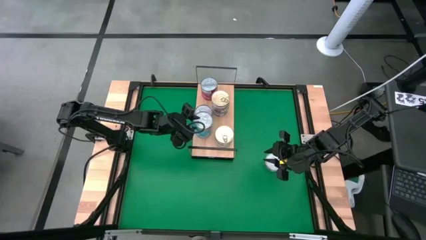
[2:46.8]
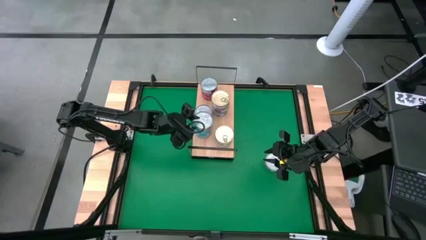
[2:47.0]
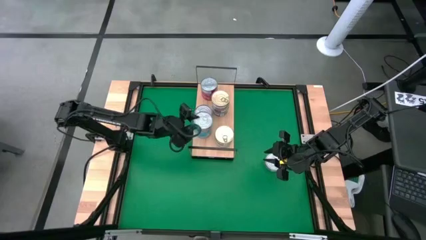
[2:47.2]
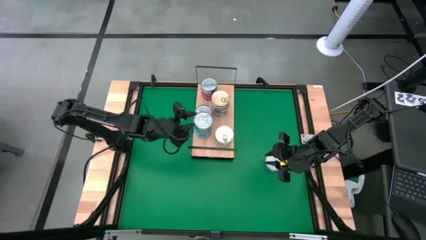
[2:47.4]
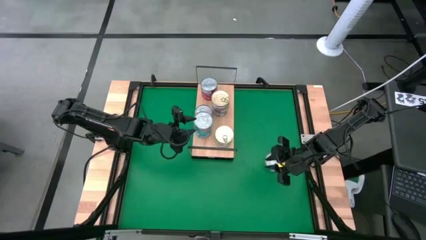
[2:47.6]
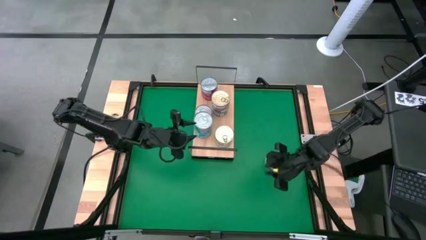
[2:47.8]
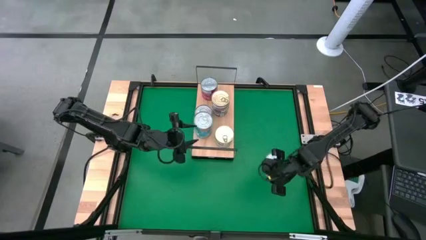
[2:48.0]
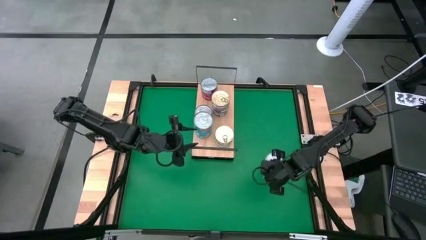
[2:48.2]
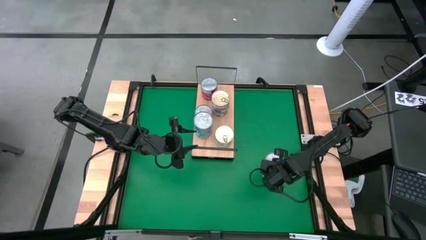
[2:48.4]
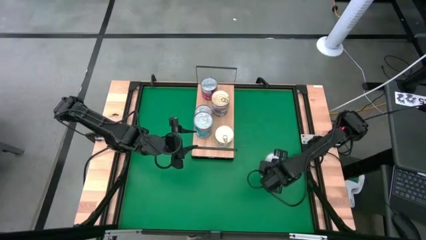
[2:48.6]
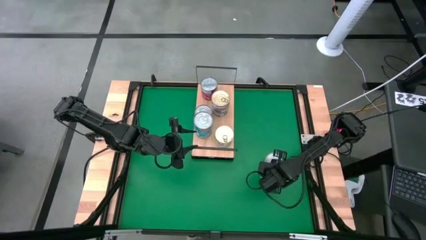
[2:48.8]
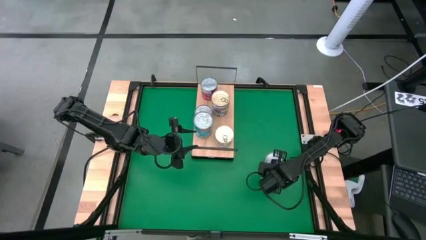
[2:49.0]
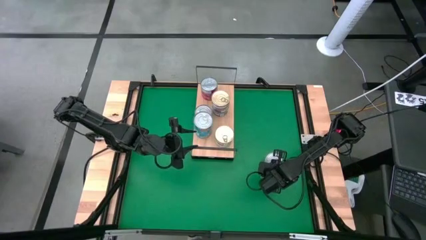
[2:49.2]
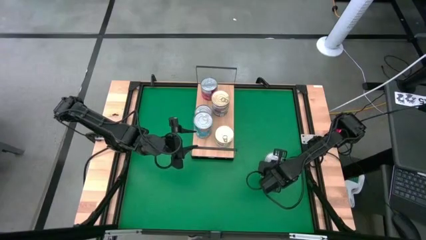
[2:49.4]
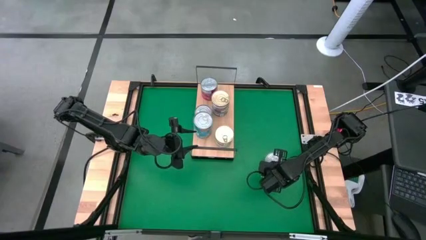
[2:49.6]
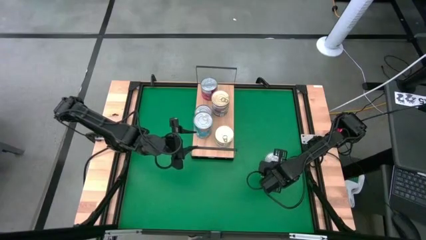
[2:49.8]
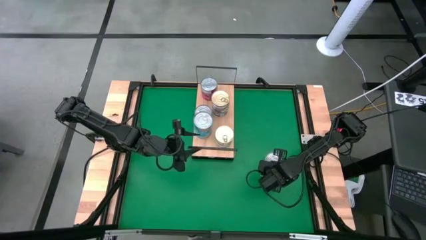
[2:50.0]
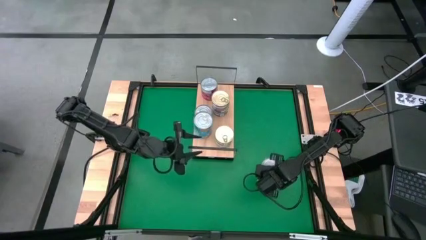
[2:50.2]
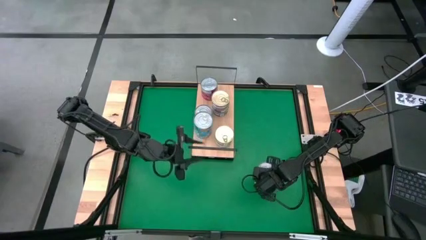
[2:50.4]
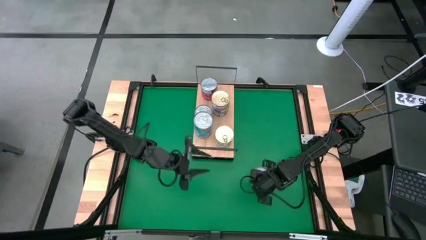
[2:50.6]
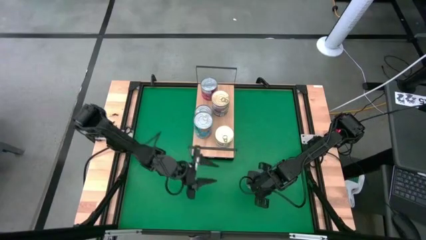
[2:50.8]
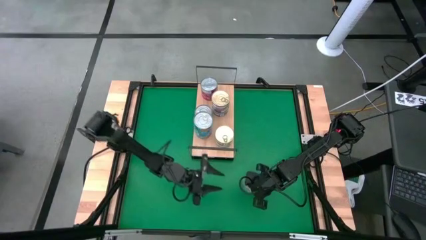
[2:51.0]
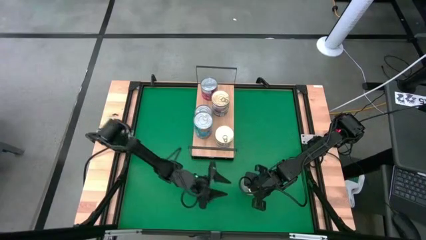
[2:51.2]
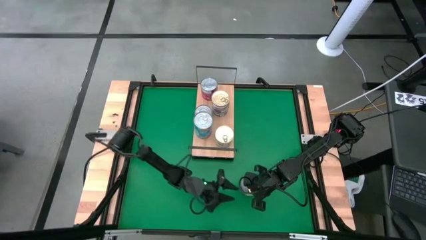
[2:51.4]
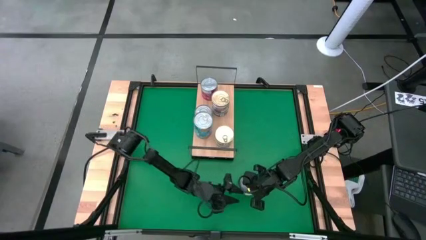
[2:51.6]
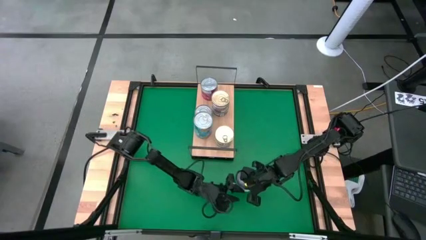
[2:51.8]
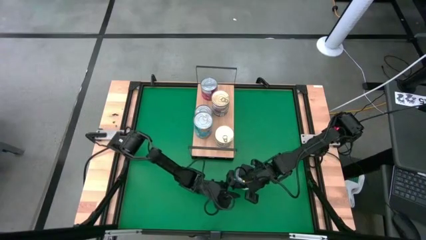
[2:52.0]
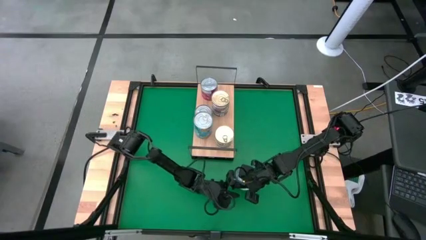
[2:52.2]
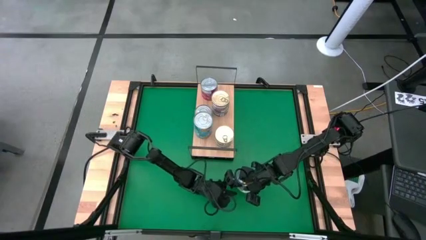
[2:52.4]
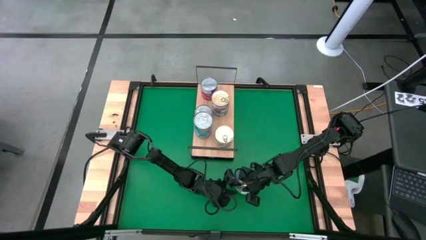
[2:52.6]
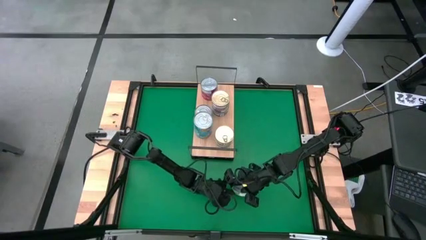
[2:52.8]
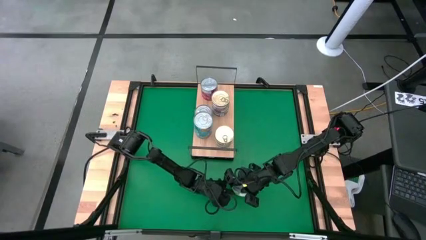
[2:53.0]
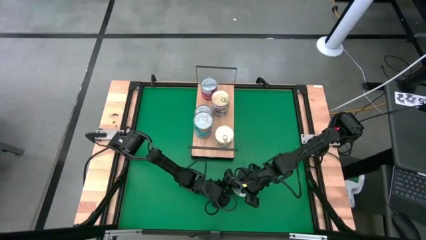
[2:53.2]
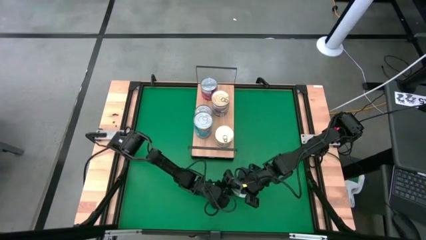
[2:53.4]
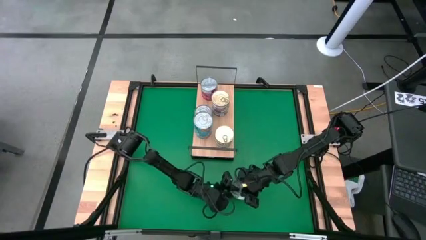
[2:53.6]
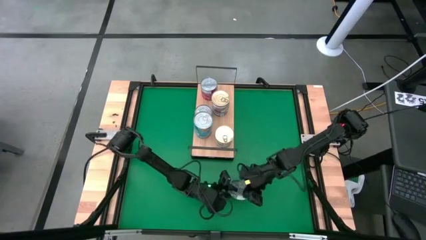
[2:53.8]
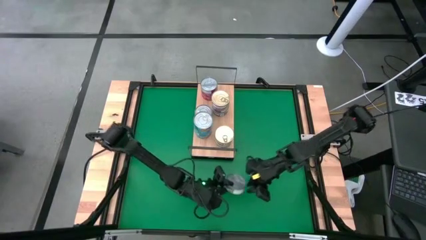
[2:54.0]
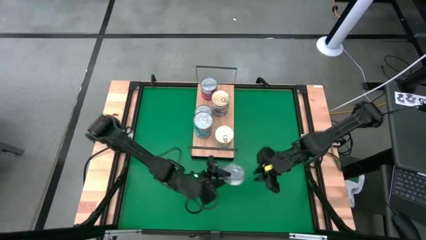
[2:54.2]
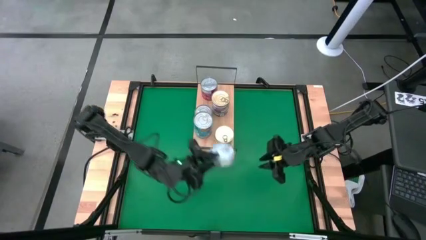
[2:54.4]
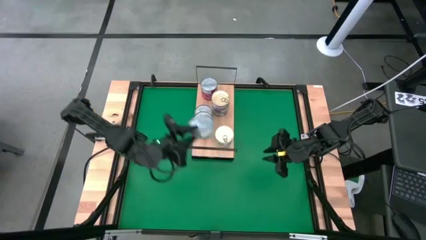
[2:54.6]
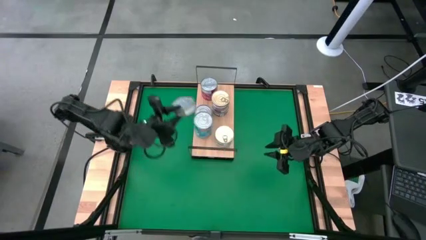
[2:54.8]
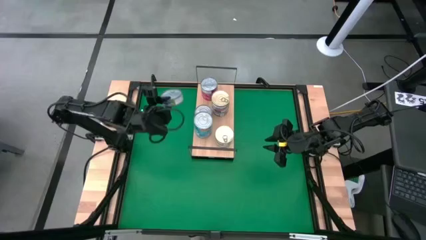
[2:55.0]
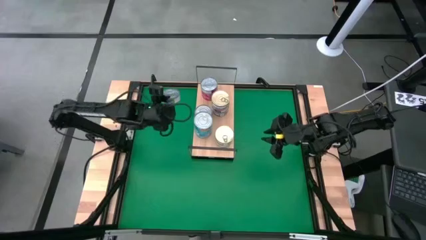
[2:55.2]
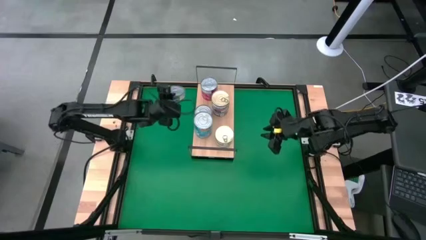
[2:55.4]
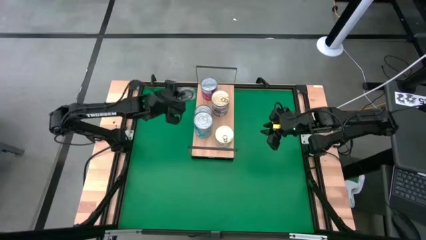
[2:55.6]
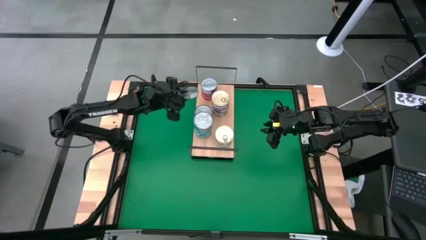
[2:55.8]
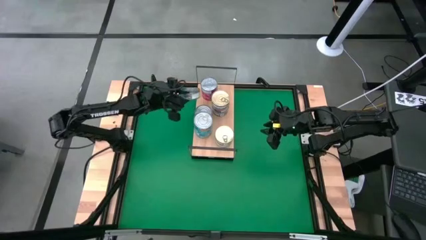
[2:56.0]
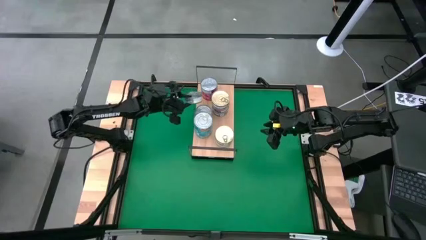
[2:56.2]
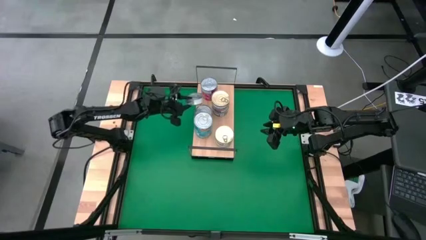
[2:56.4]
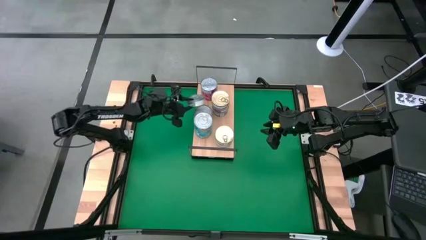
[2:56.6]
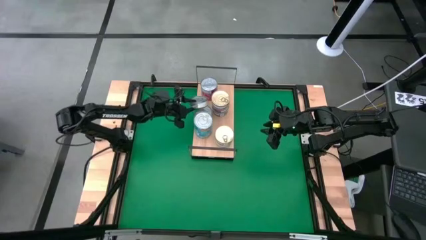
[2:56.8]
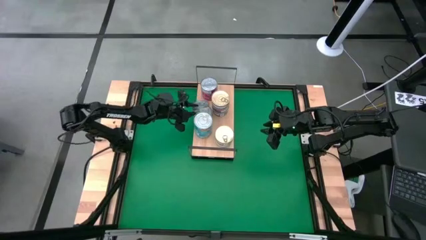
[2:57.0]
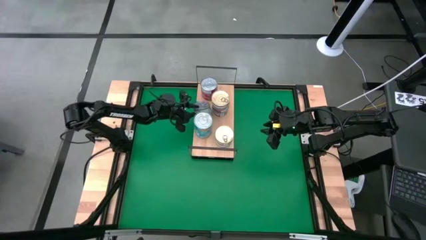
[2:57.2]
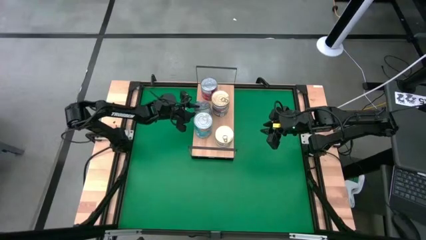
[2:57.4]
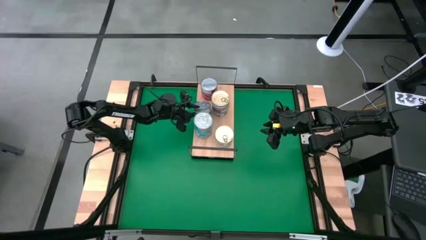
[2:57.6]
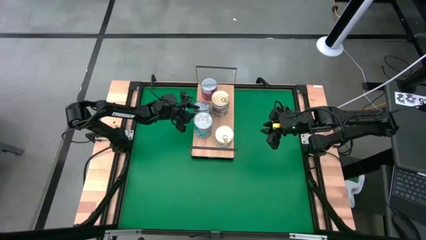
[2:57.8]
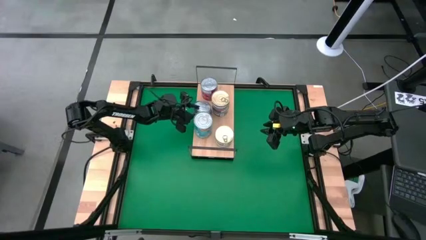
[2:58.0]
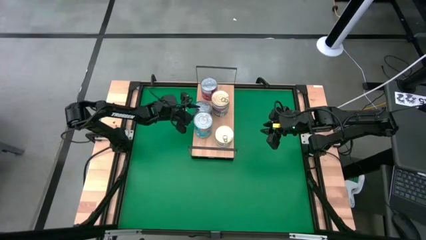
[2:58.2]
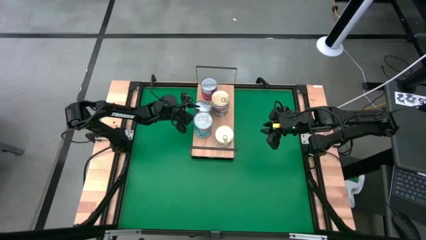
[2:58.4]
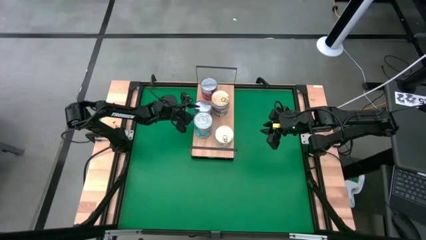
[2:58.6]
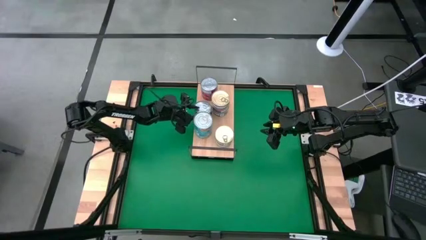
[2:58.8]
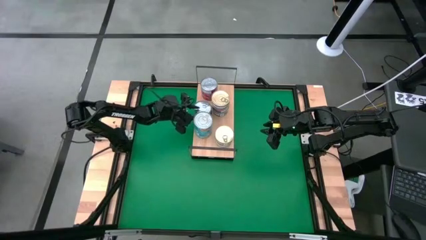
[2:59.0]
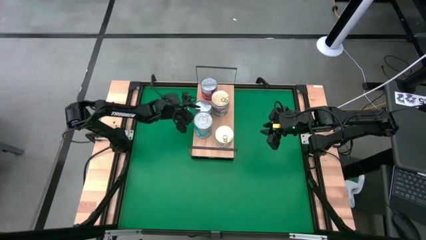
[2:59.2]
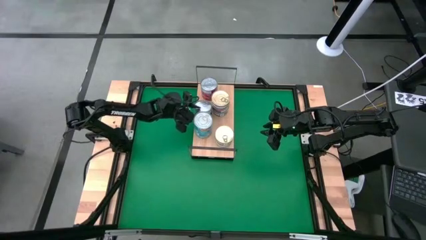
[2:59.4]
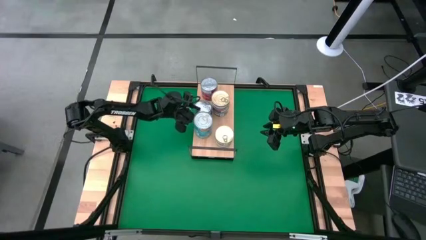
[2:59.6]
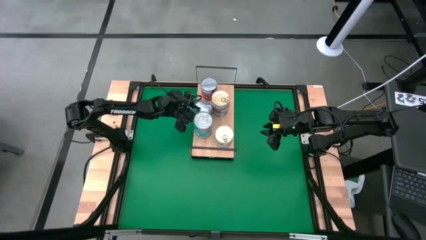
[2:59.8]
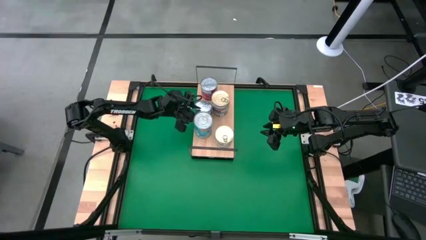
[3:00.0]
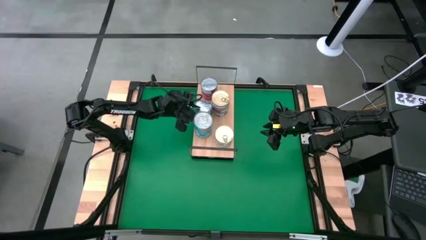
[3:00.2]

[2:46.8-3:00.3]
Task: Stack canned seafood by type on shelf
Stack the green tuna can on top of the green tuna can on the shelf
